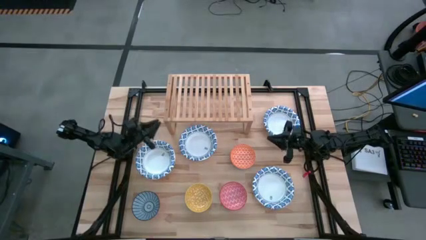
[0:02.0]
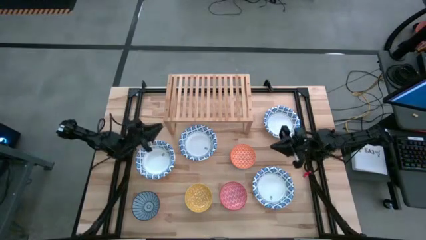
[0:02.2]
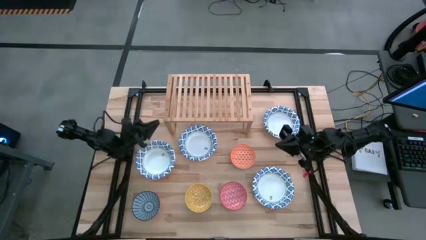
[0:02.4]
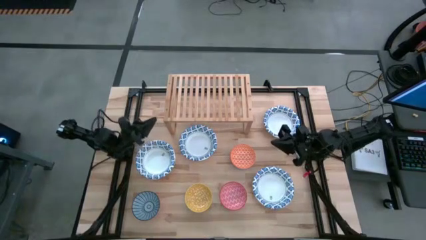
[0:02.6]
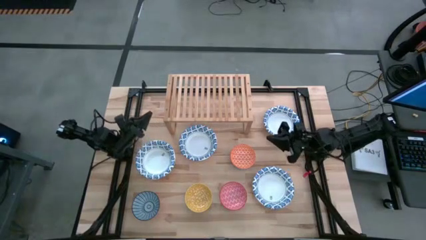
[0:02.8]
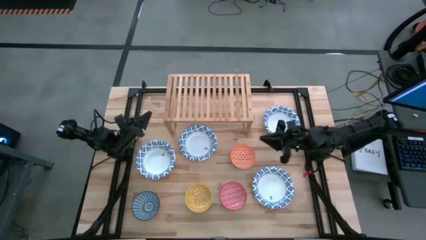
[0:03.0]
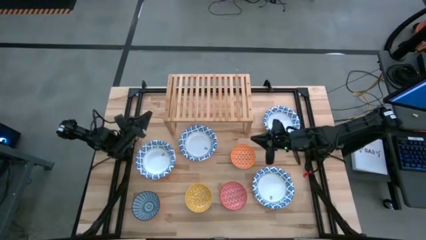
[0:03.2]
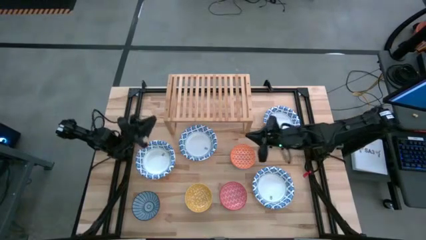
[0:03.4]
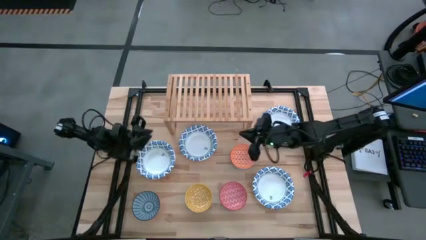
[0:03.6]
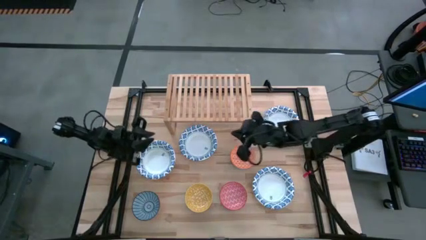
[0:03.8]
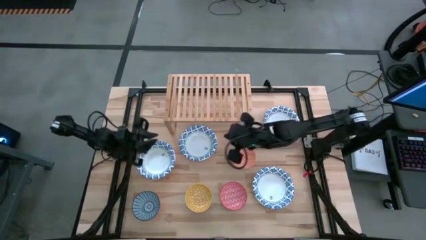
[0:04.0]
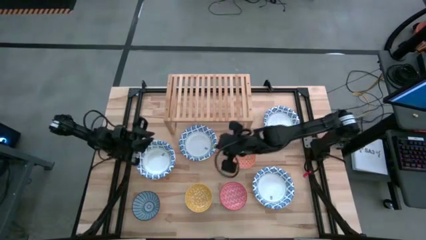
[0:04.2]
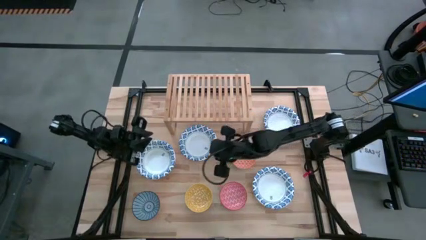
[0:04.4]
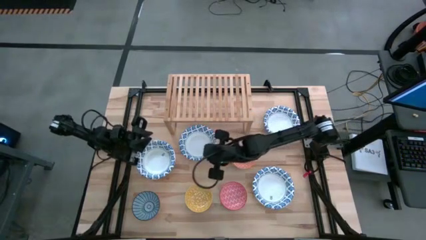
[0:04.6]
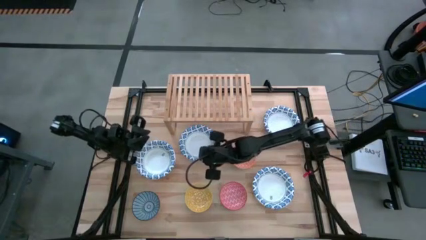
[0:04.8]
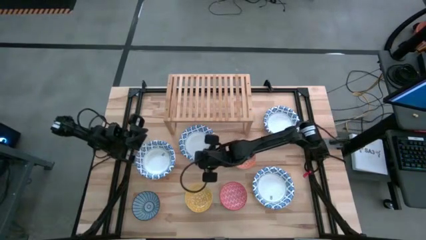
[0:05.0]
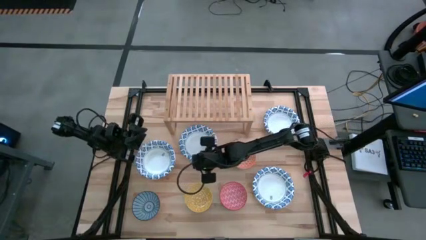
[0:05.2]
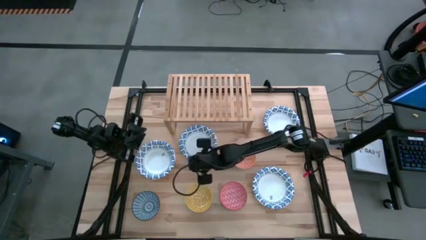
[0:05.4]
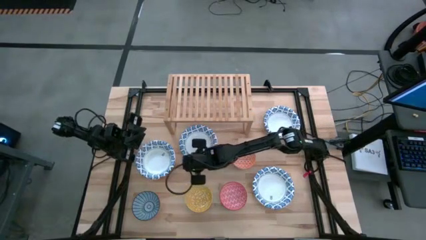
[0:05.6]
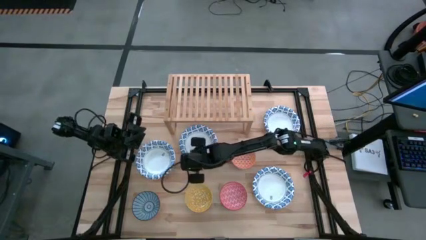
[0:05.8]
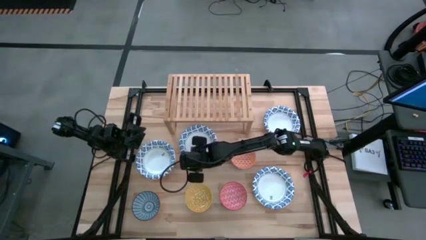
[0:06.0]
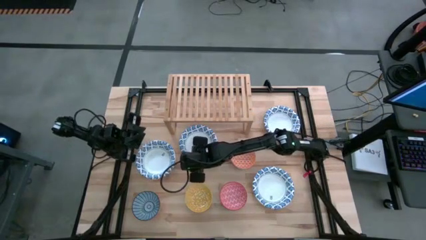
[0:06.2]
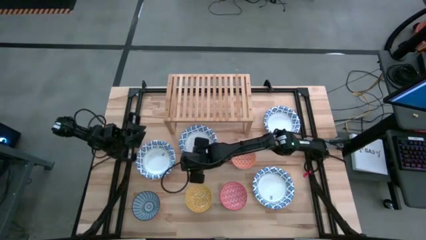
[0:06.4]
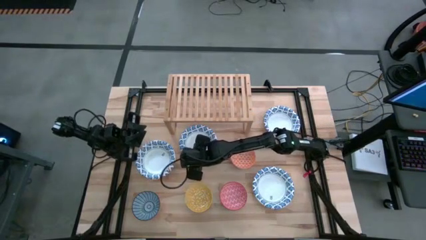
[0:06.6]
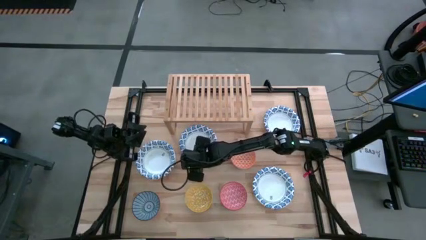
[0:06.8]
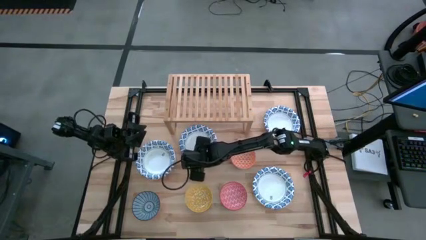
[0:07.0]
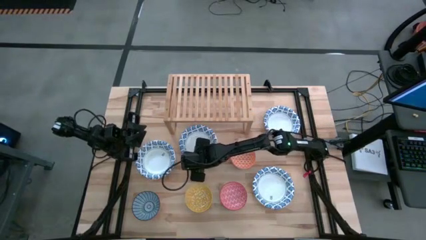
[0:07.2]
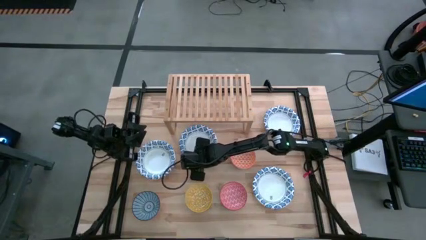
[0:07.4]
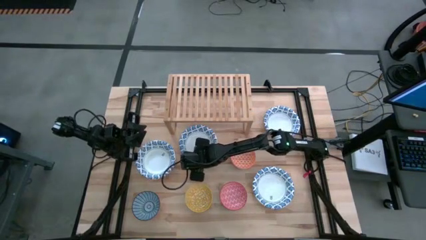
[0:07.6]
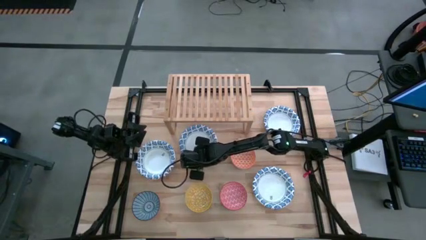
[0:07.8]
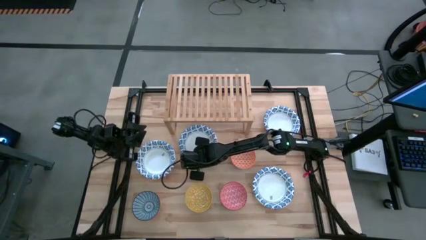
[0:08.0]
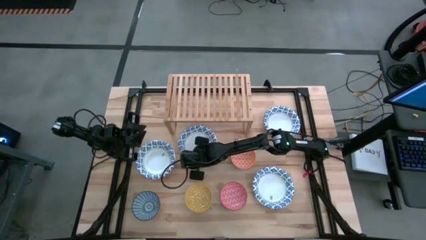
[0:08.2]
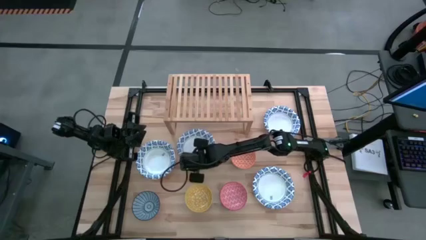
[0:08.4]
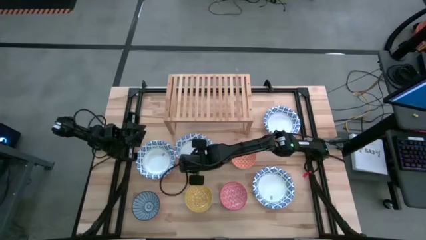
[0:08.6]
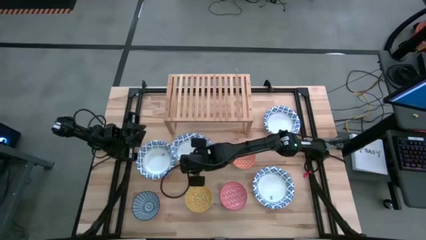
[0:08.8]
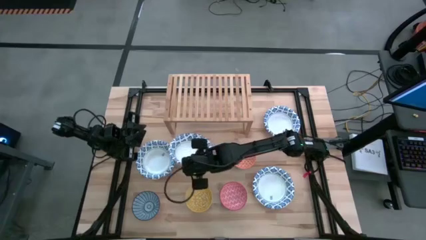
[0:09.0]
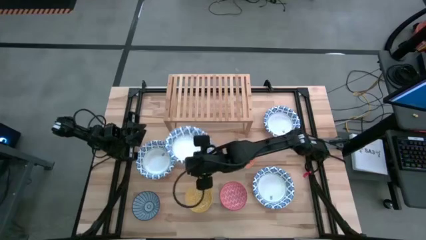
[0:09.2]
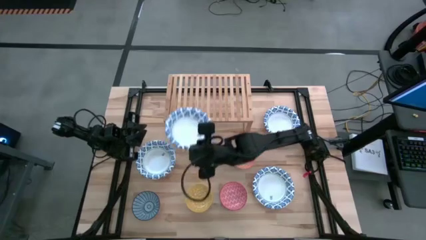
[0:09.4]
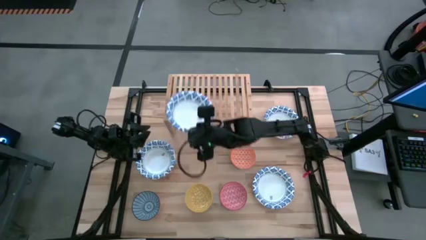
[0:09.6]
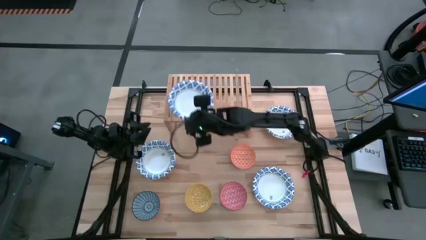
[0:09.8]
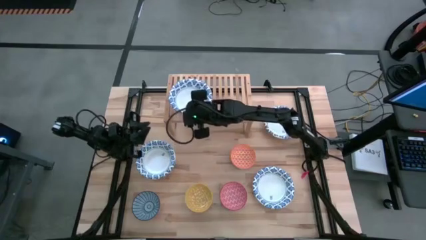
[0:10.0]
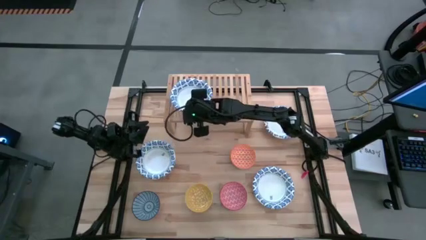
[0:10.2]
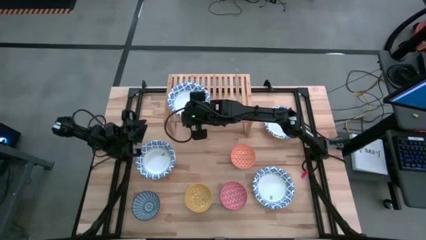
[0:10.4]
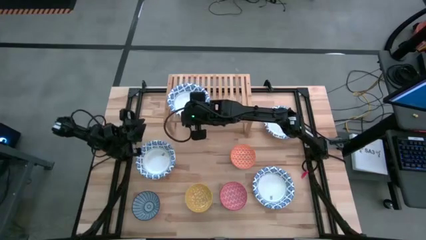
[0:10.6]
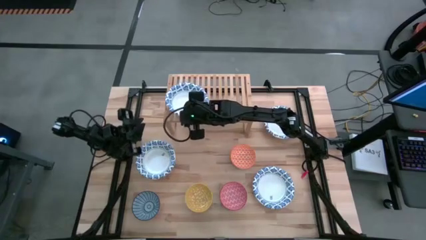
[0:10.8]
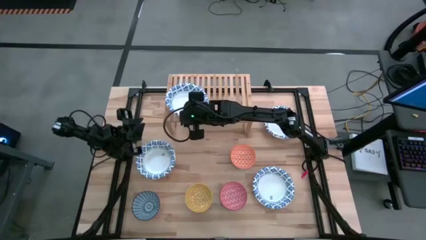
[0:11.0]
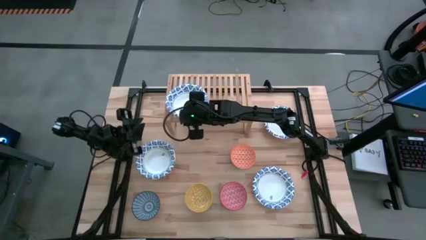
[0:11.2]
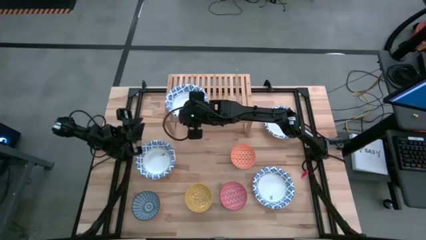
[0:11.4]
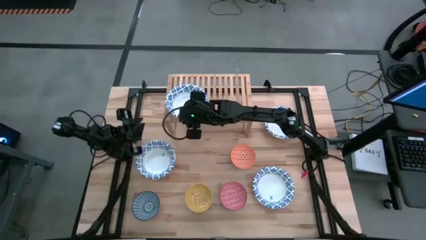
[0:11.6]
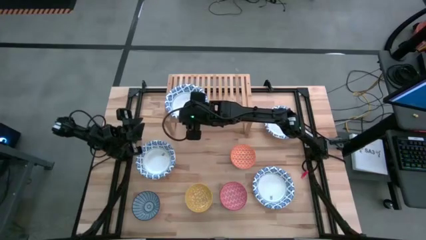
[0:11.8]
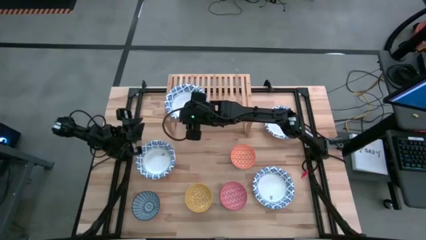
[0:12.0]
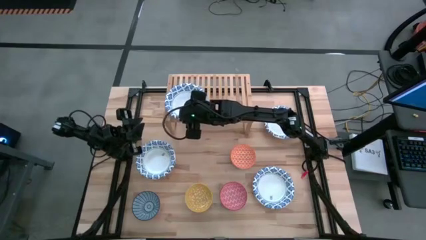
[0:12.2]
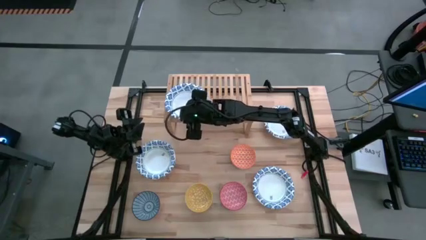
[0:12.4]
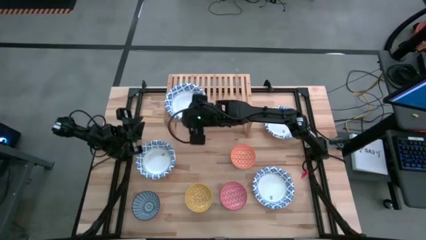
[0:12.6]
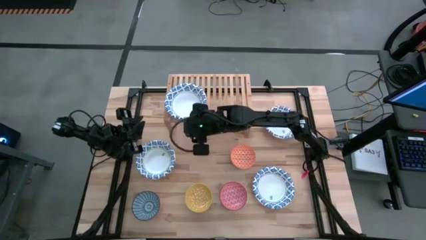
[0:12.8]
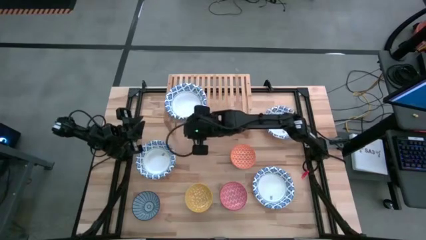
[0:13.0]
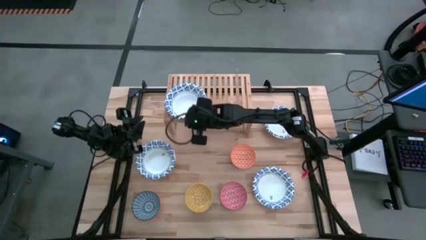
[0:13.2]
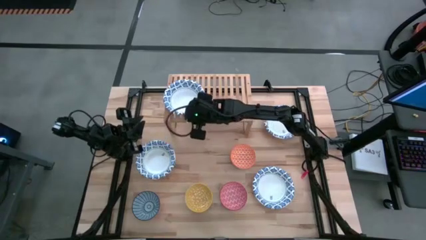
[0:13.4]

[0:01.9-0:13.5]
Task: Place and stack bowls onto a shelf
Put the white patterned bowl on the shelf
